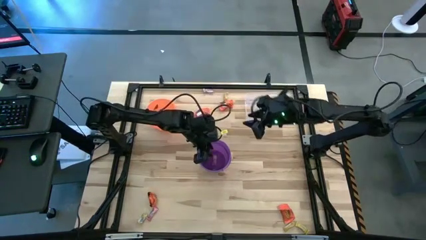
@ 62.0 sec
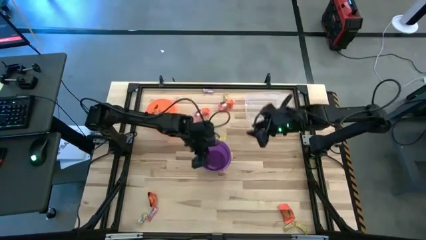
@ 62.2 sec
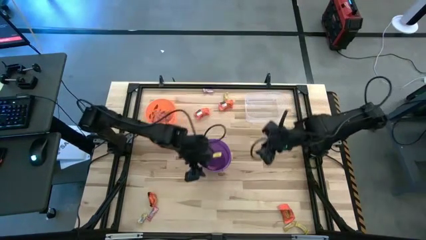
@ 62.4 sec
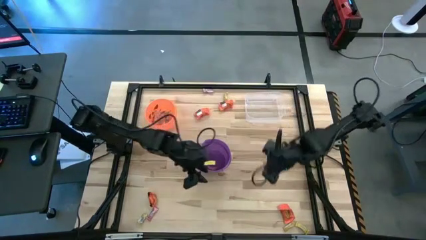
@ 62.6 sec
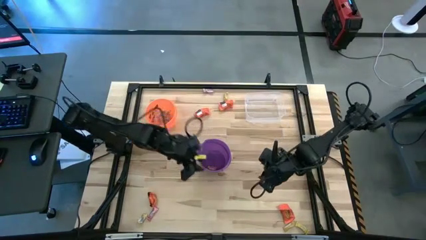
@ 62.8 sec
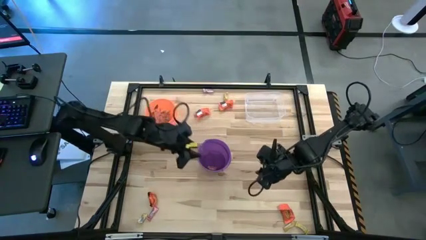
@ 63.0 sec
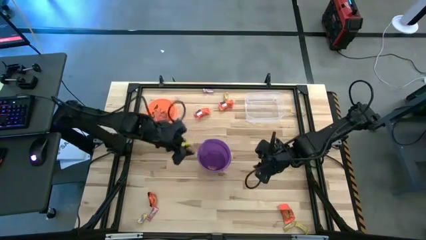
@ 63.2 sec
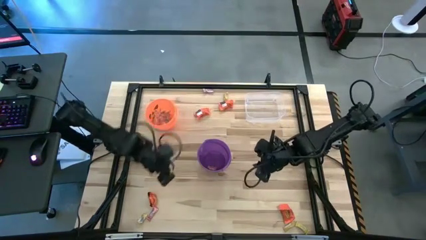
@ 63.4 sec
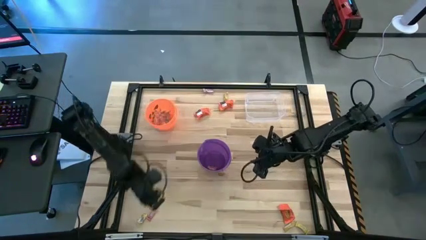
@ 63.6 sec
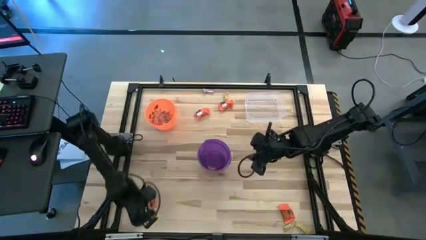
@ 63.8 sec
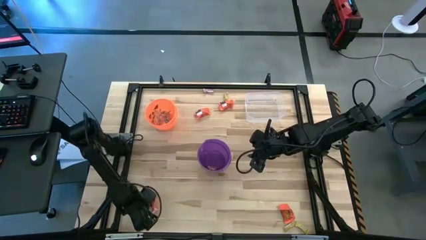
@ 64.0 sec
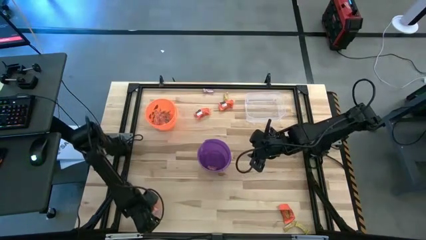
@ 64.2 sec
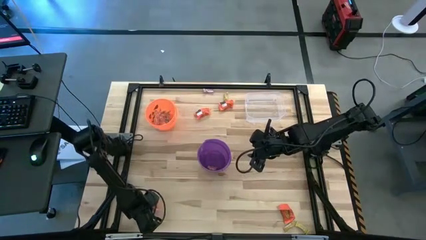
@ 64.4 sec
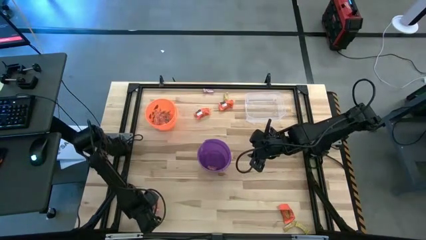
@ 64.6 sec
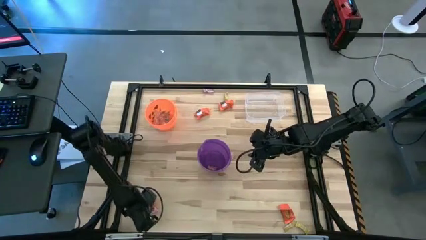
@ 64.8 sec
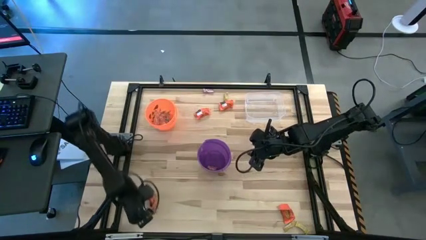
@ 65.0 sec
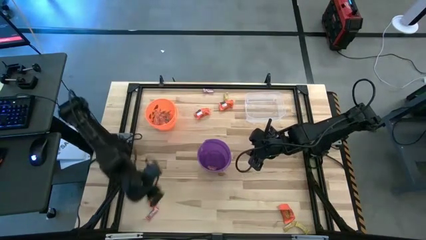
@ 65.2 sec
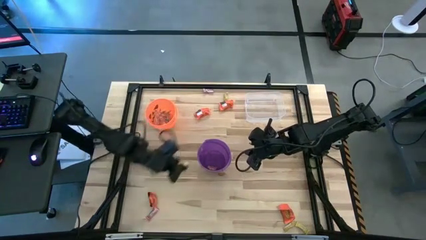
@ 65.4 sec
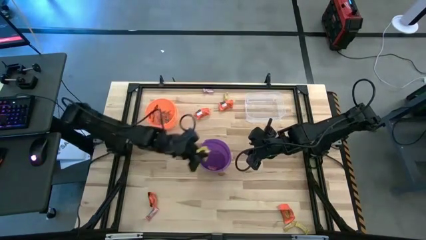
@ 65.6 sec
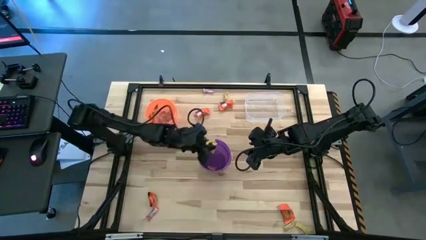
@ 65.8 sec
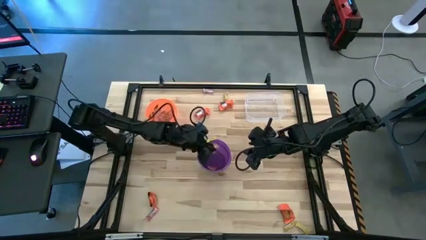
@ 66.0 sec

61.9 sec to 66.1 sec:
Task: Sort candy by brand, put in halloween buckets
Put the yellow candy into the purple bucket

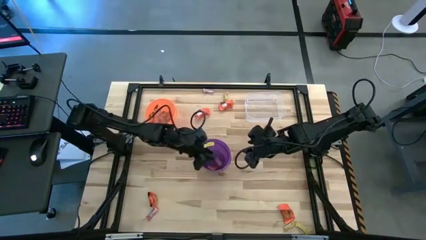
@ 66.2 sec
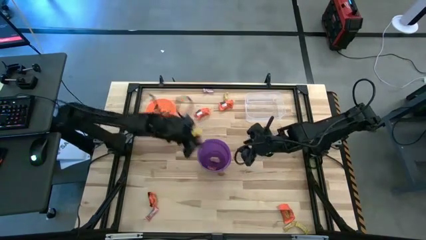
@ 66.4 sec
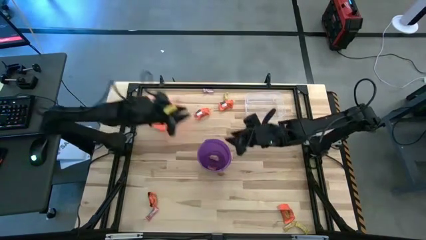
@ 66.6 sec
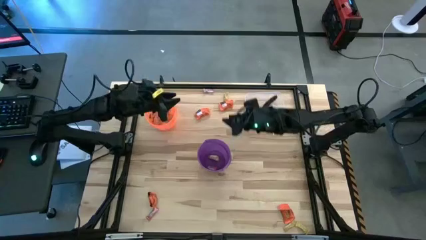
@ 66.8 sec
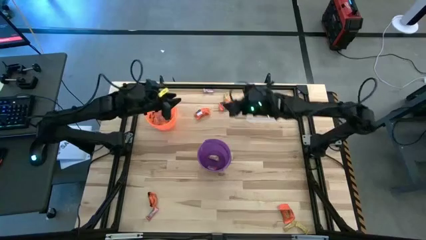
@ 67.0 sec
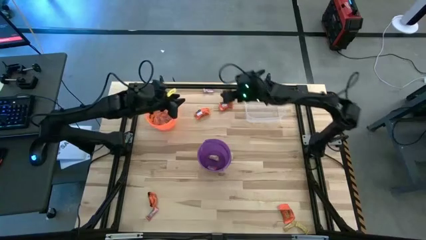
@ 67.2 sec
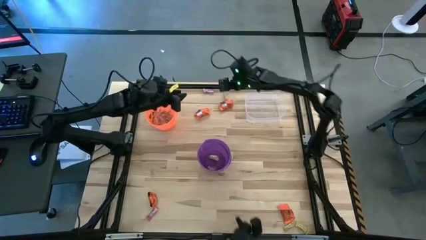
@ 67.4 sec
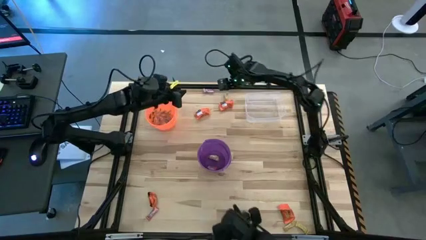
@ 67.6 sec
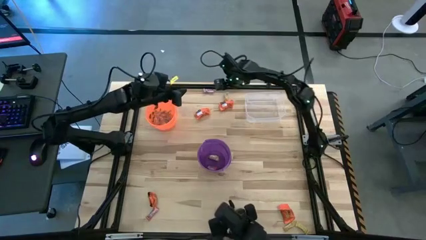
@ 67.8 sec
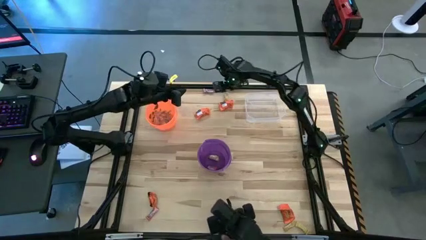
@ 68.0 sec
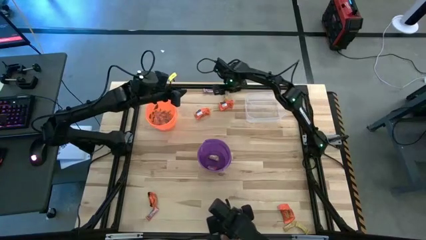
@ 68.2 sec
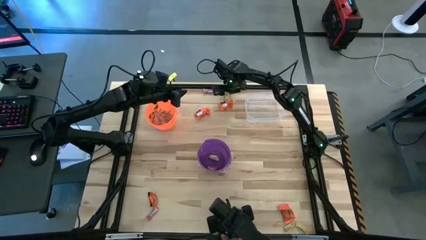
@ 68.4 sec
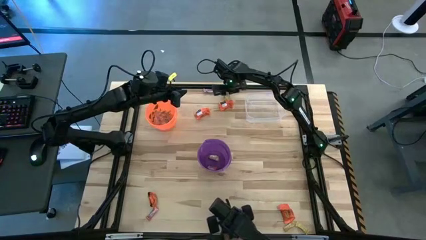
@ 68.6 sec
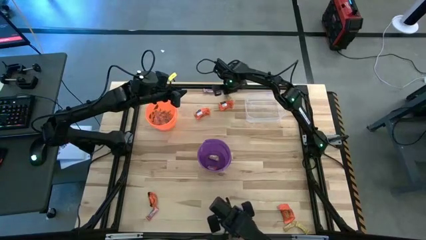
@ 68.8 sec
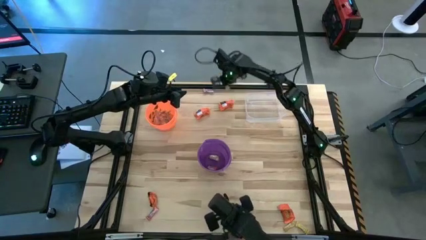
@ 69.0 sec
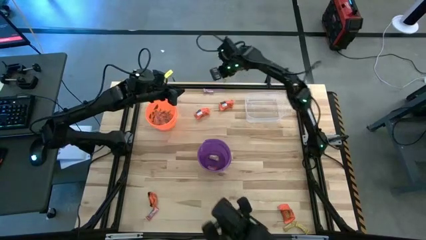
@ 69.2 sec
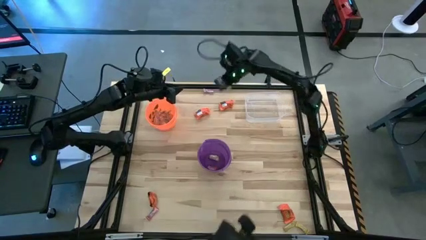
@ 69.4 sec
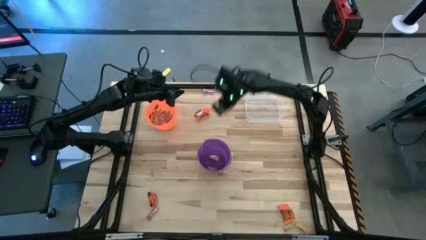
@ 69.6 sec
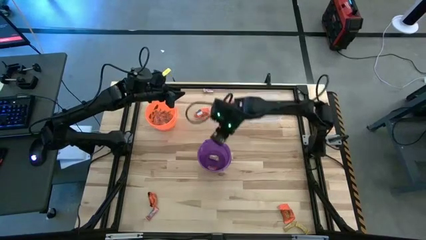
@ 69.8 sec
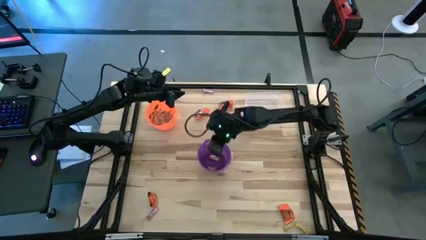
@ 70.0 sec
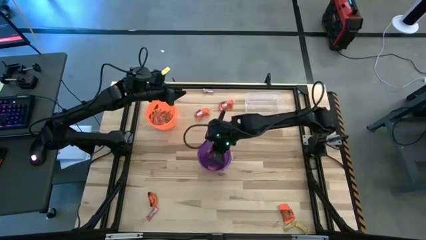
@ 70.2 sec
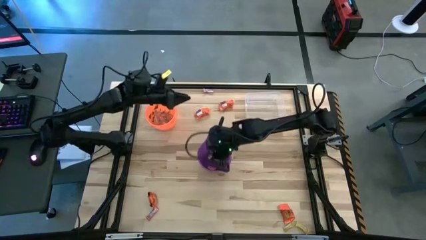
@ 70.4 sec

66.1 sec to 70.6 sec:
Put the yellow candy into the purple bucket

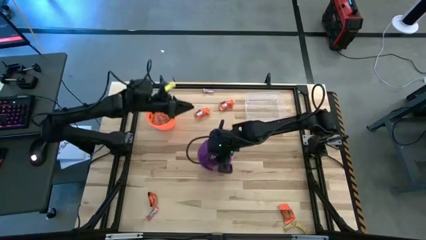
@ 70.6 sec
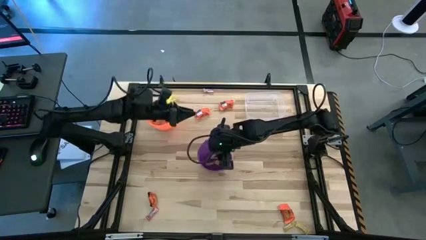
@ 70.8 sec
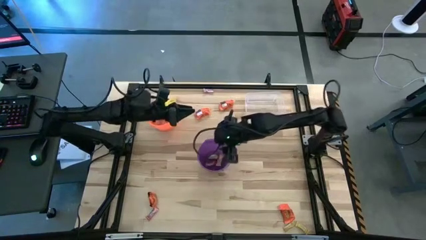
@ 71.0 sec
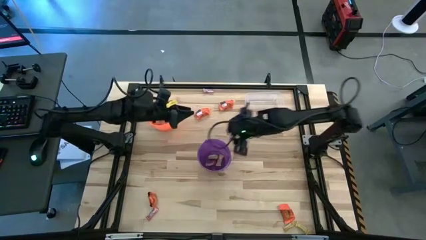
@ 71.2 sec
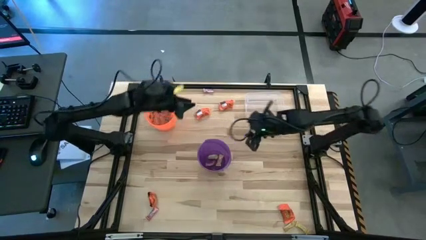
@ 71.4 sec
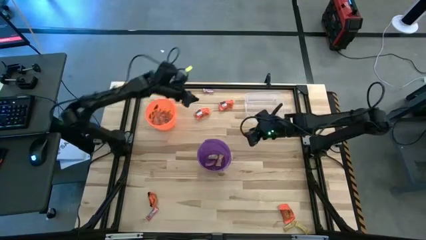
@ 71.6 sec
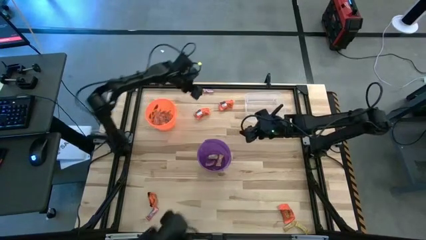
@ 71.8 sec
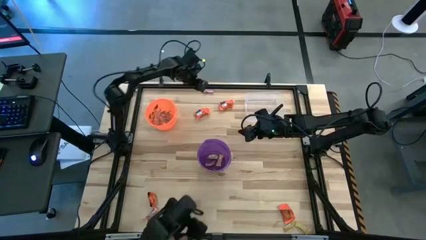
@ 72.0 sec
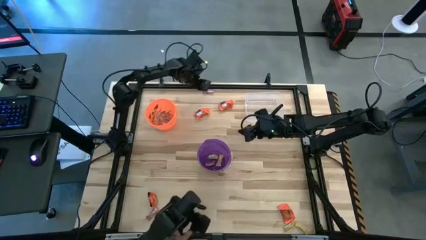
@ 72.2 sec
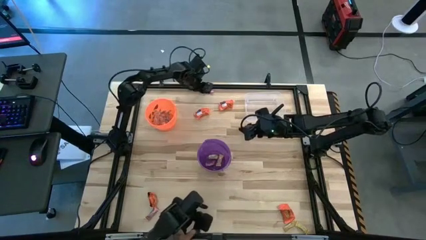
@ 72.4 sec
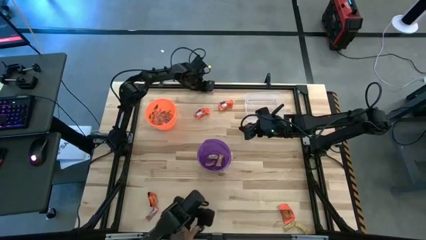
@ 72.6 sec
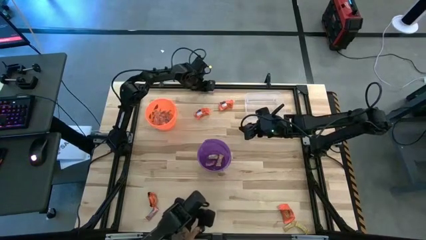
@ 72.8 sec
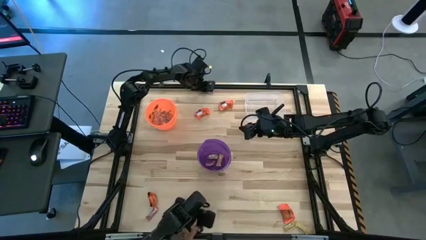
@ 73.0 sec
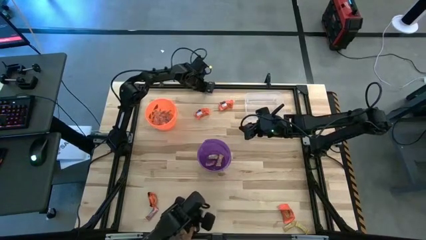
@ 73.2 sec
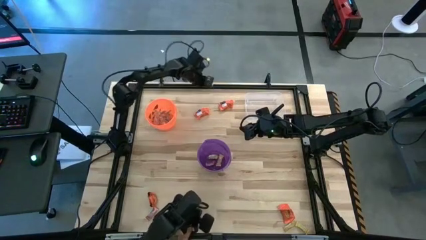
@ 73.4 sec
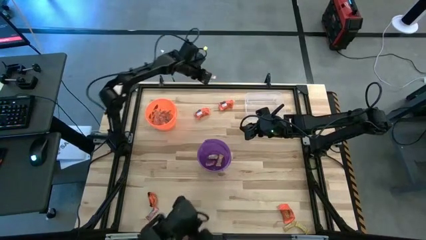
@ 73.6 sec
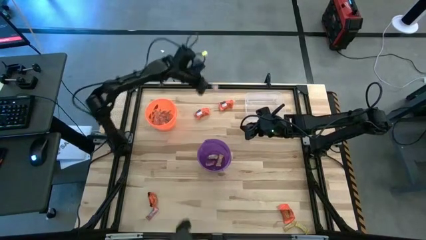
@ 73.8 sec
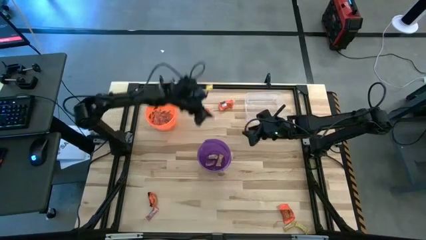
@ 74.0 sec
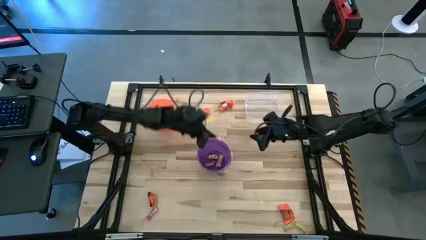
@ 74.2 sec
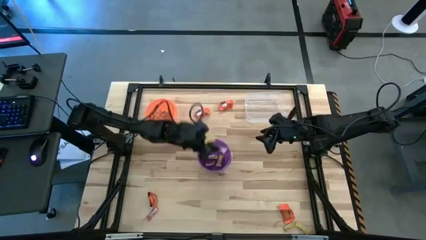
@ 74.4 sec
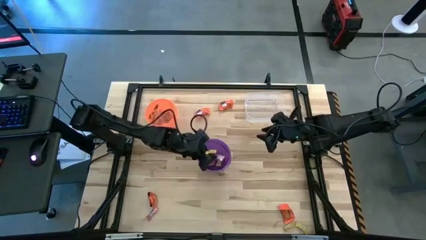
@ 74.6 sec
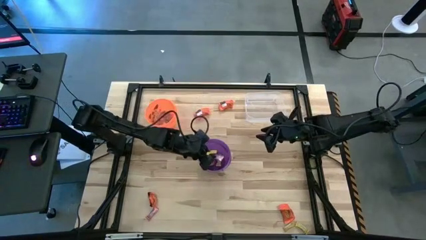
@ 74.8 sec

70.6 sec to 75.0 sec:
Put the pink candy into the purple bucket

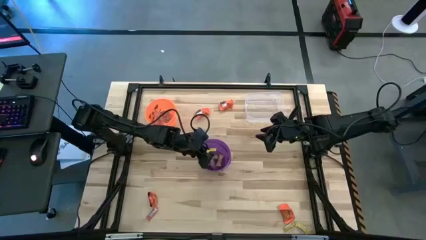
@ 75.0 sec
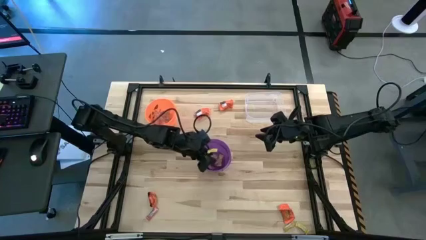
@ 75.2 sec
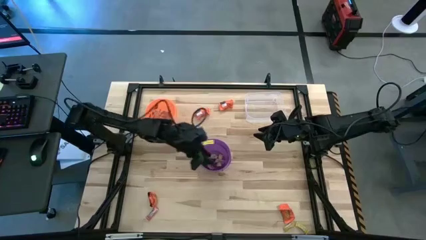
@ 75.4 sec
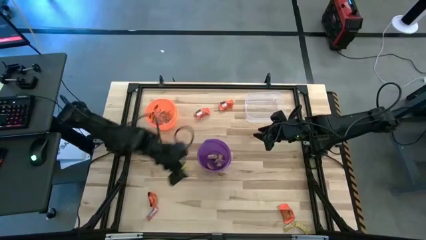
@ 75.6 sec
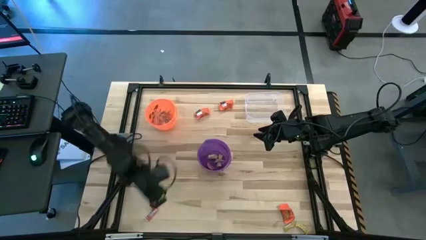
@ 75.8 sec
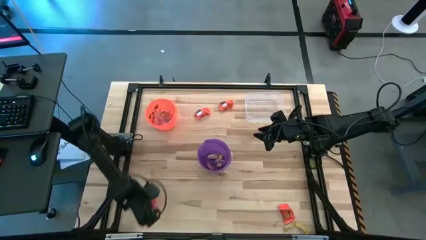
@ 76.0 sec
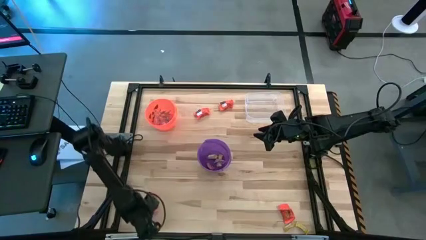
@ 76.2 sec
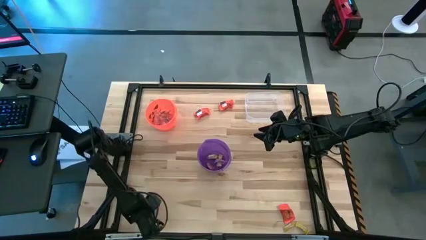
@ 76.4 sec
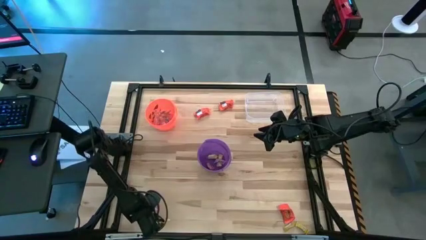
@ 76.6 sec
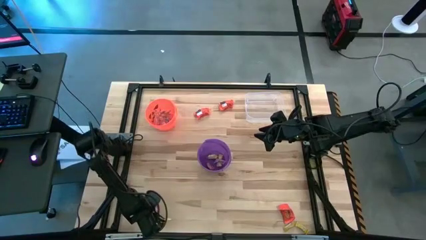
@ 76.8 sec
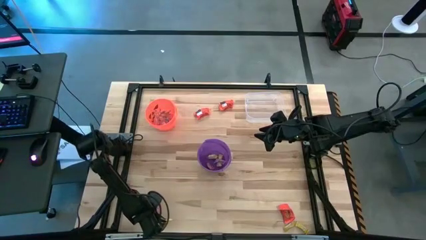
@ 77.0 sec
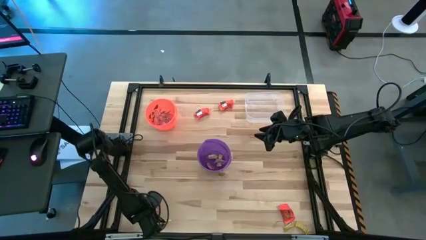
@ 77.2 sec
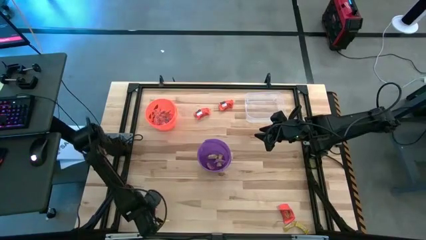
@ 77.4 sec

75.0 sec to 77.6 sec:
Put the red candy into the purple bucket

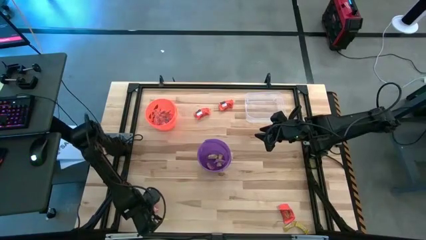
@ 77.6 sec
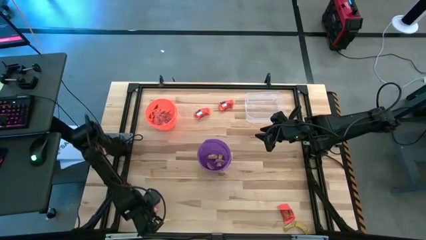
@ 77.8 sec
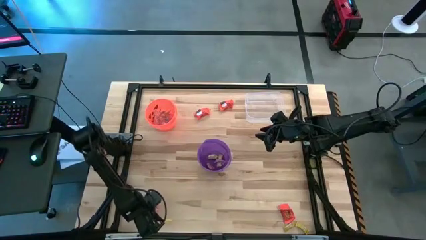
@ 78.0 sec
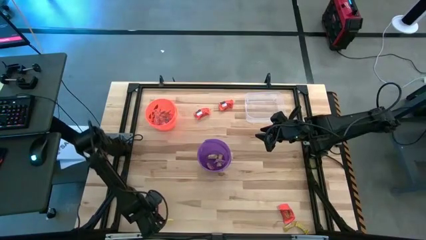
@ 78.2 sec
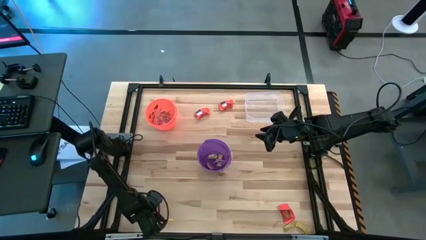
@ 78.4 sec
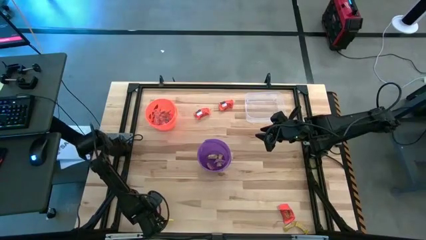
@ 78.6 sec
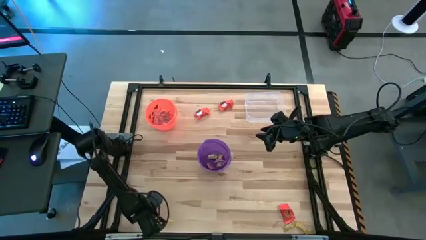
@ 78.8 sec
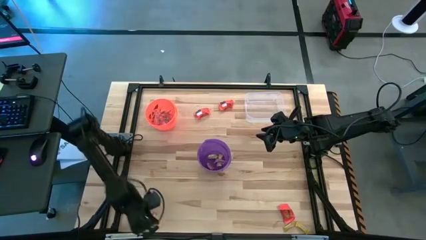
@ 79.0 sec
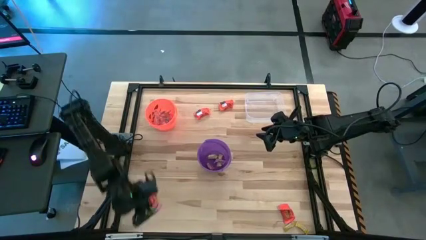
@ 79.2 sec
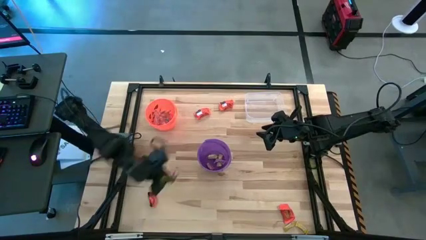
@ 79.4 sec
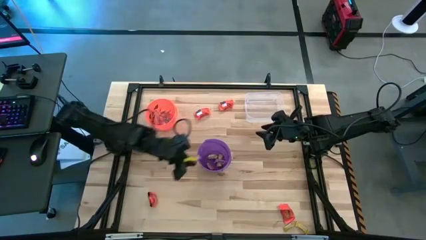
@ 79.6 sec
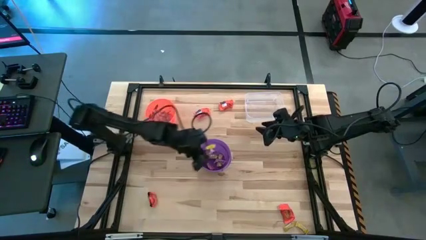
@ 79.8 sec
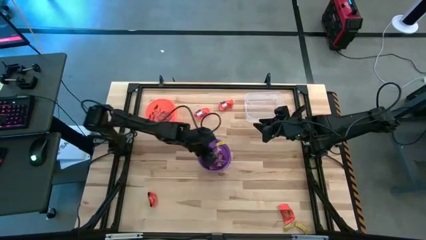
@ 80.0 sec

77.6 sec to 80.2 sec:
Put the red candy into the purple bucket
